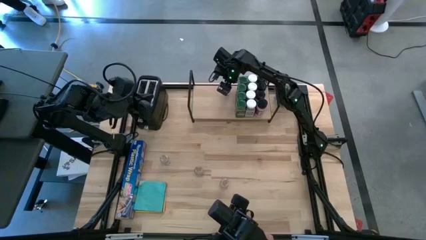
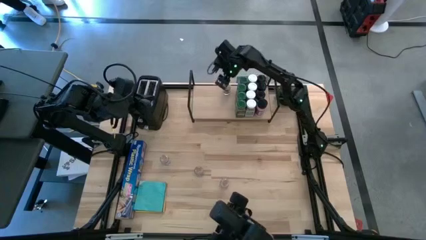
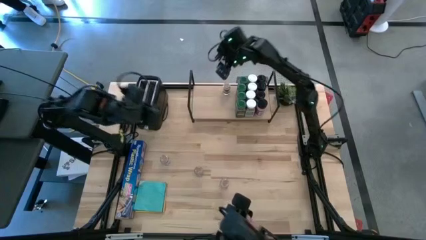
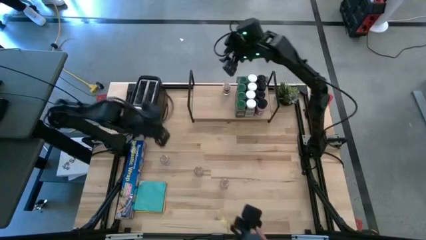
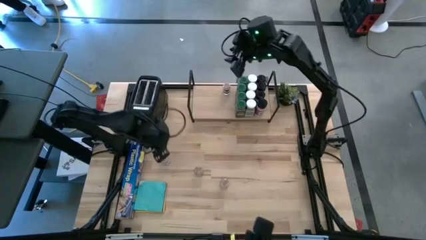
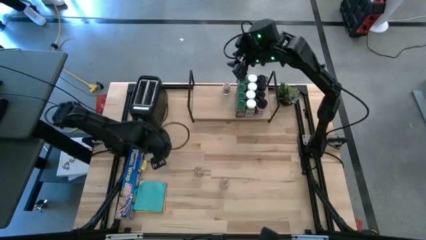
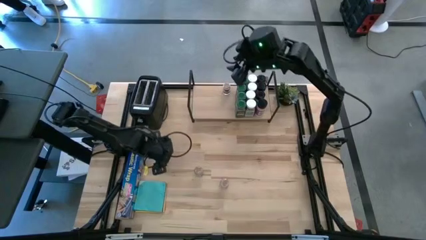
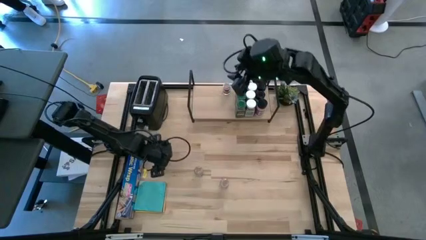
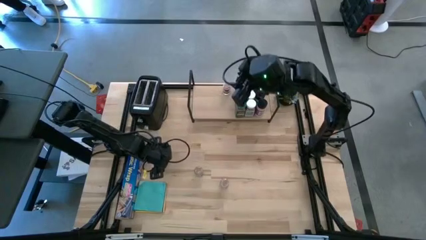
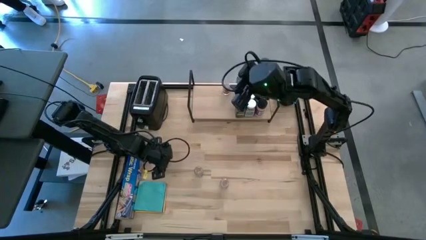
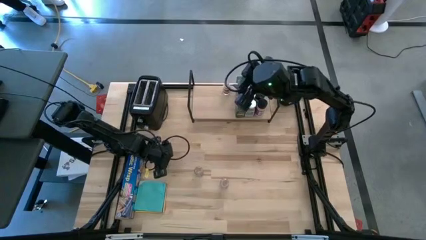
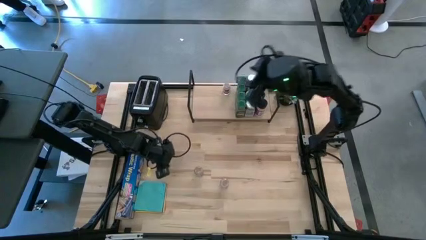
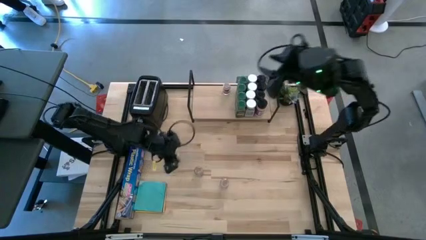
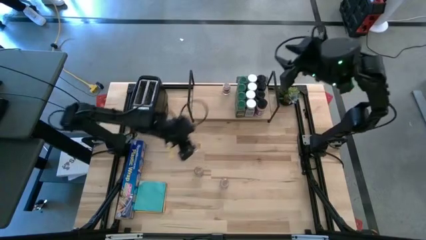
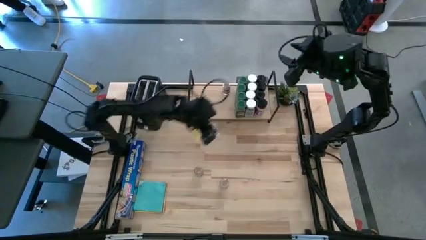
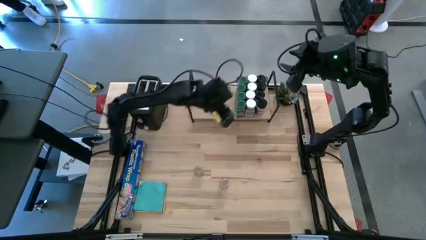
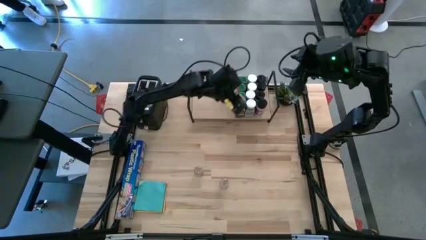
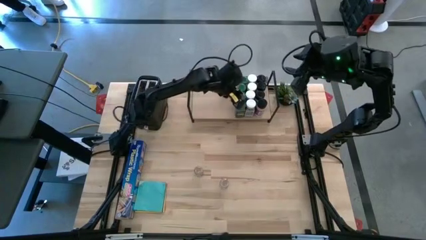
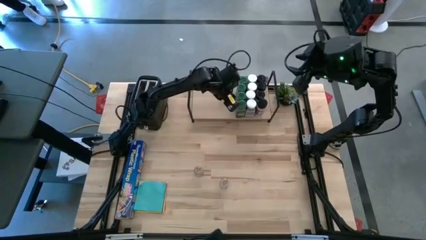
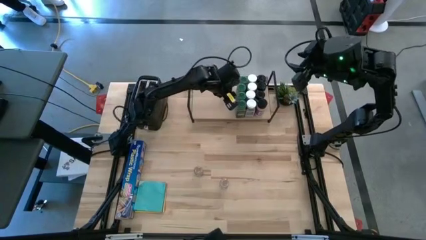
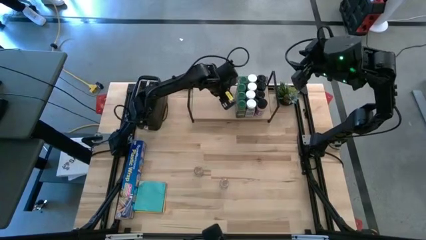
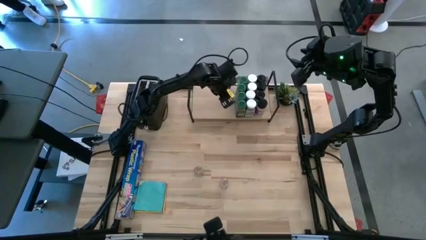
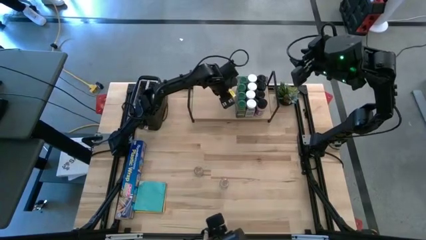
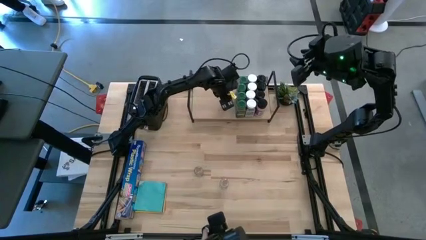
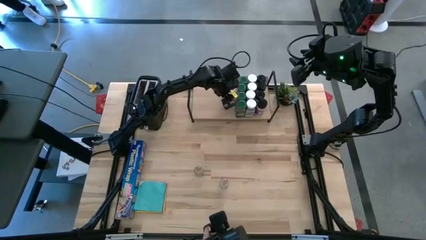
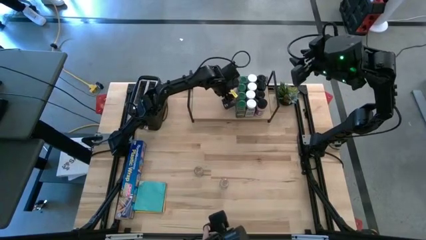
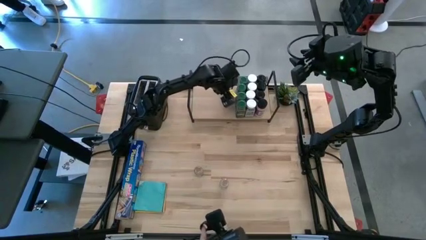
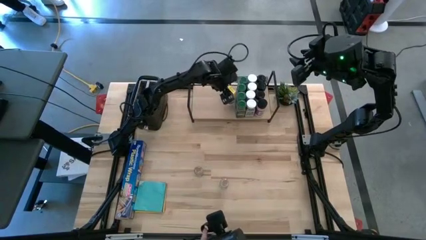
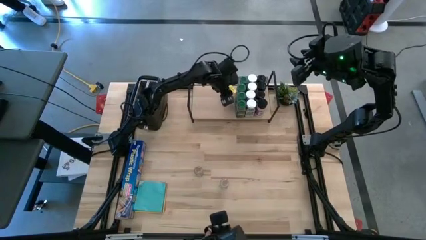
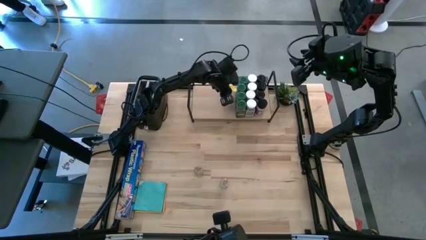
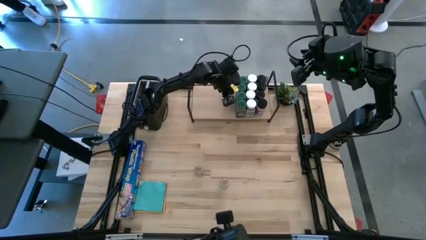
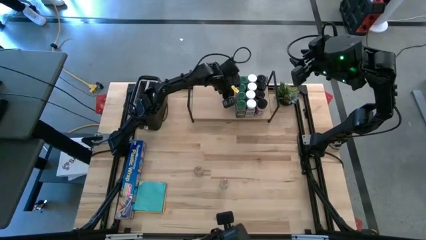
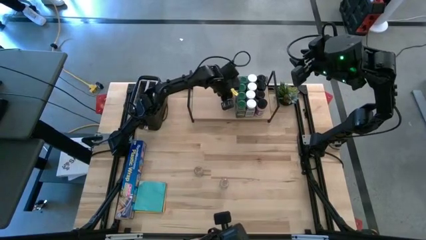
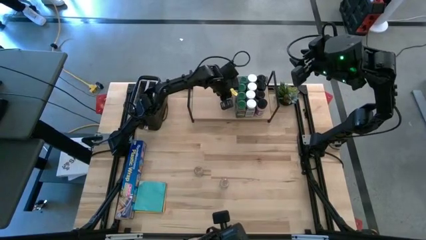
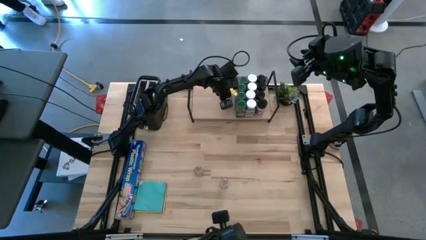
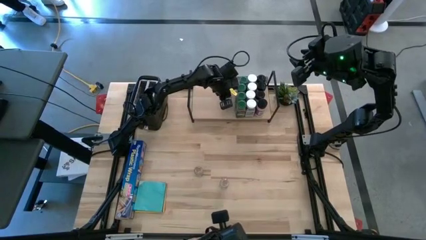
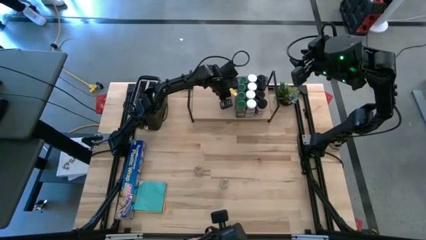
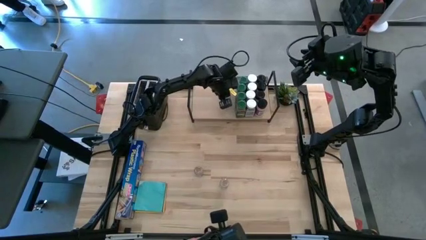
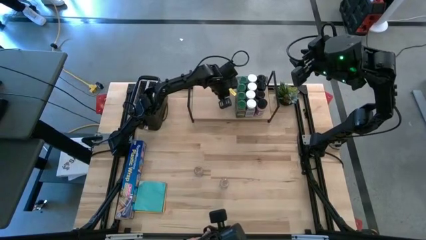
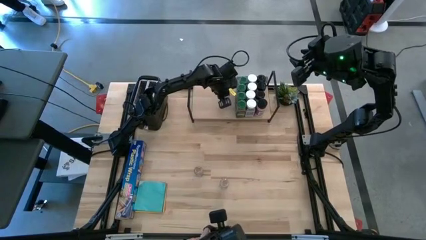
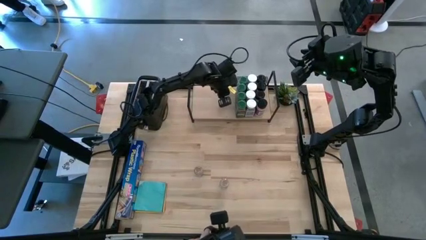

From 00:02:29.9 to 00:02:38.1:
Task: Shelf spices
Put the left brown spice bottle on the shelf and align with the other brown spice bottle

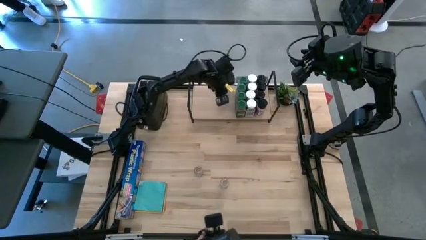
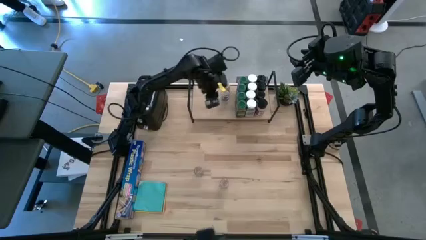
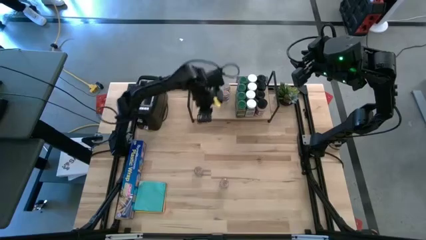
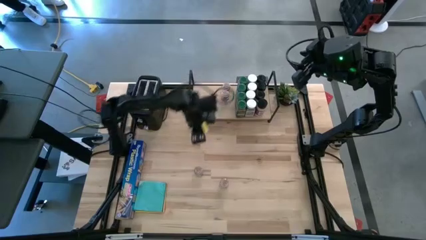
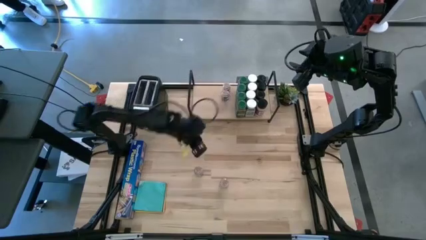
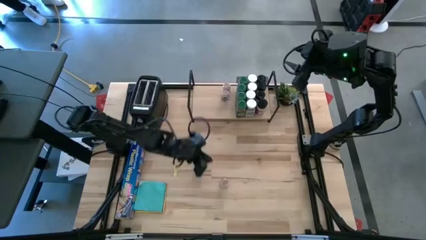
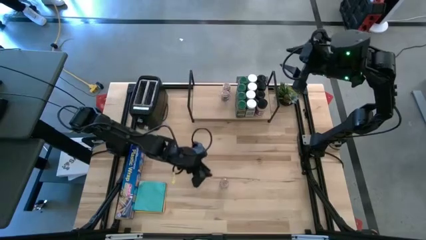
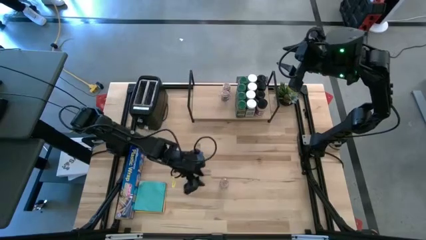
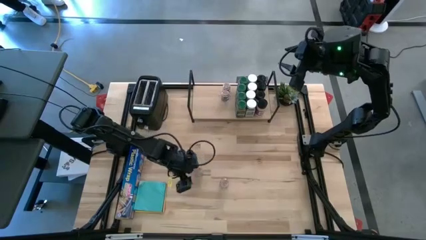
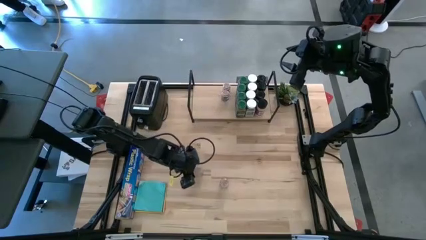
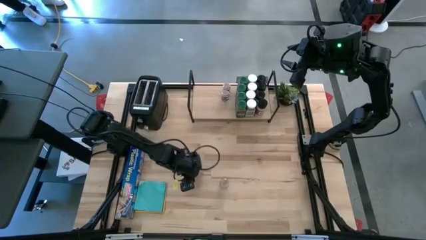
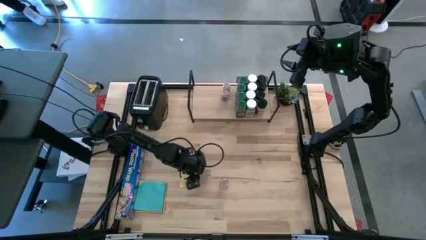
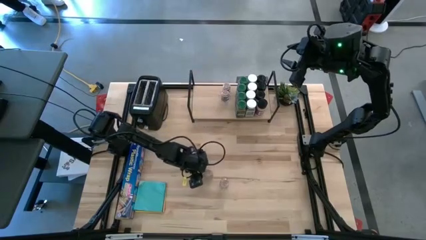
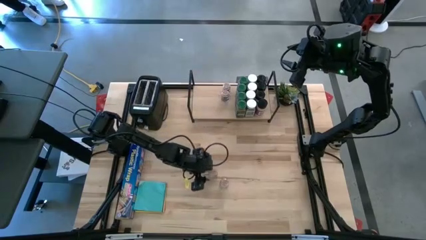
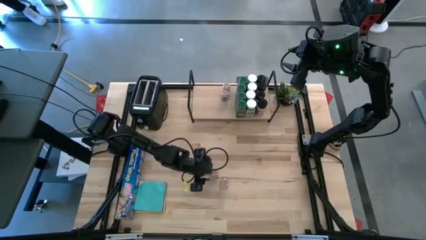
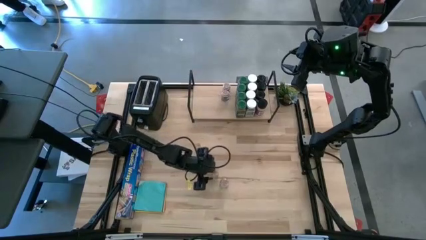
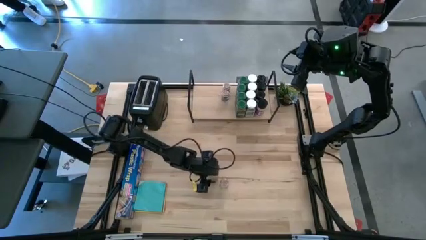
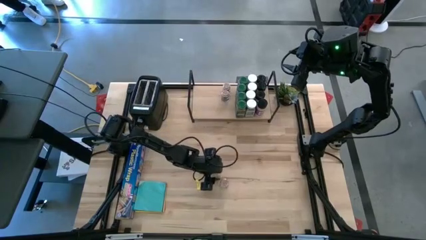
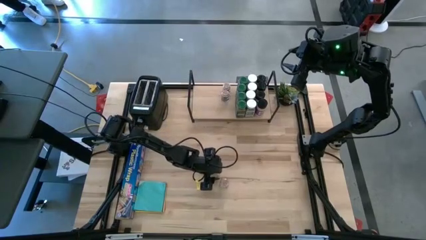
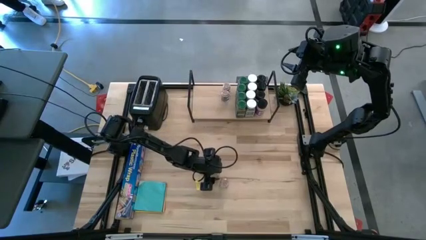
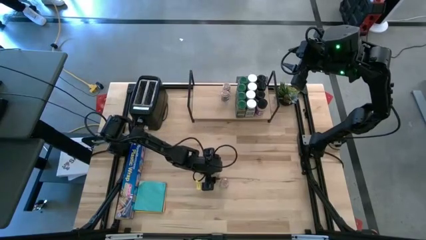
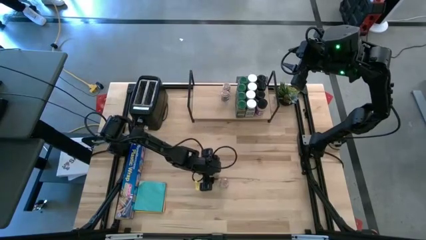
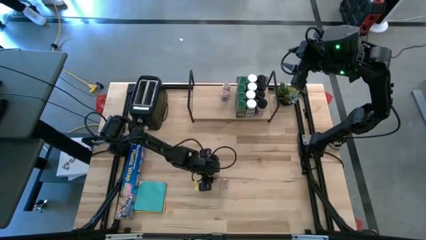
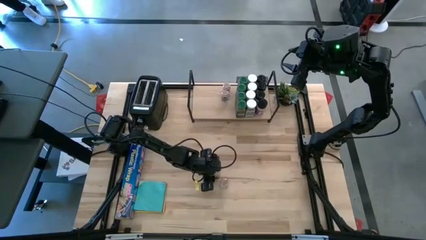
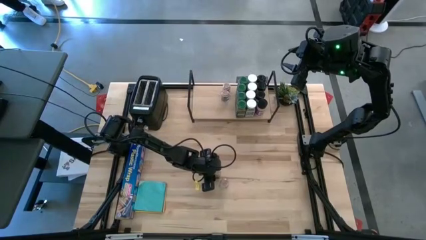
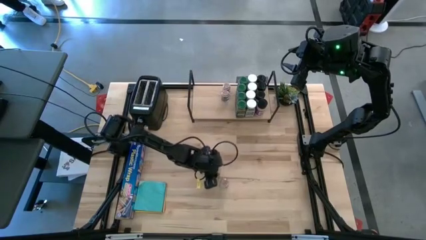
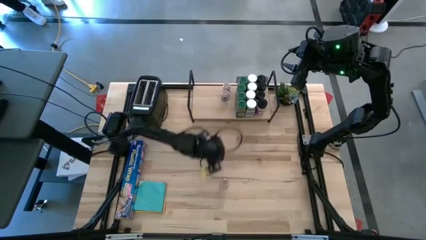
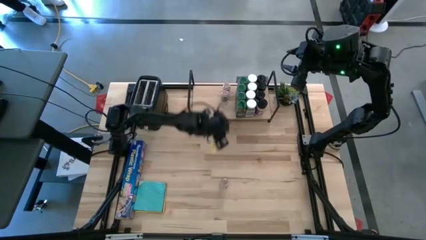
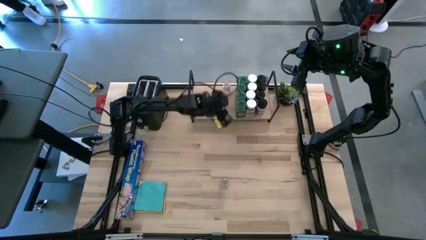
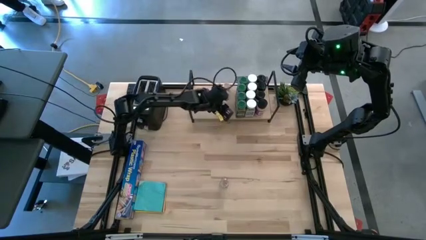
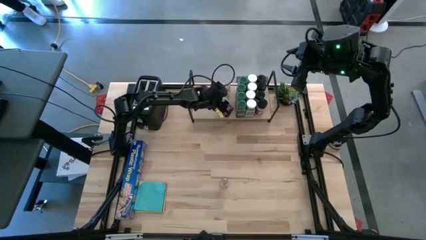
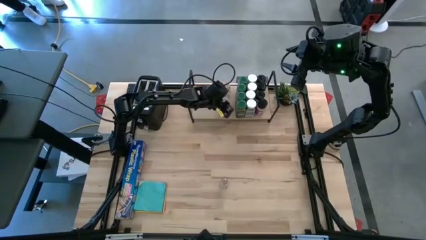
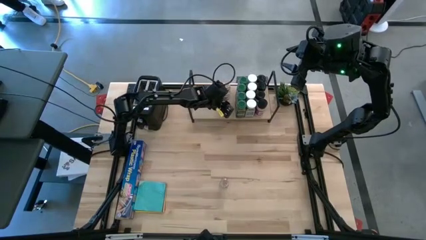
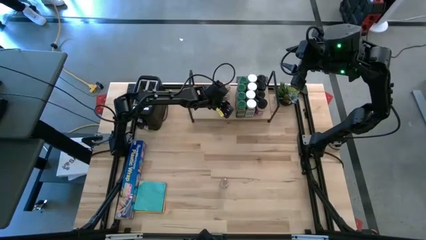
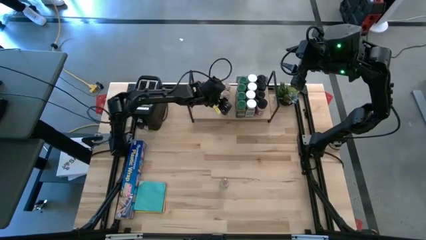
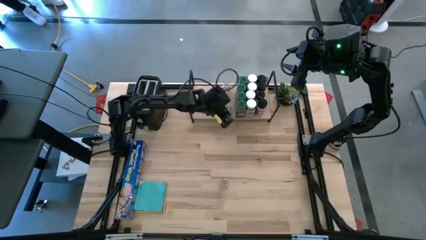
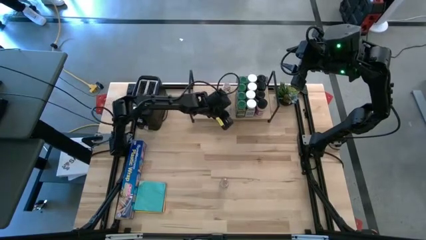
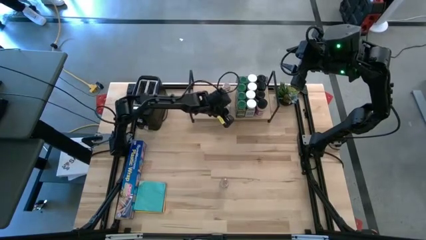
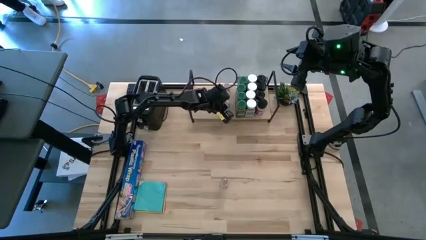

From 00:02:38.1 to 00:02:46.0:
Put the left brown spice bottle on the shelf and align with the other brown spice bottles
